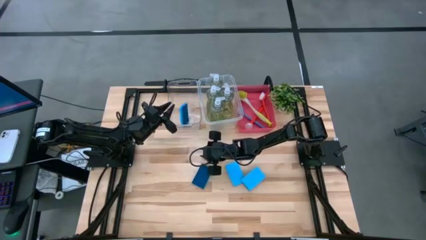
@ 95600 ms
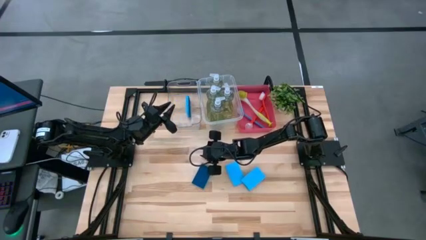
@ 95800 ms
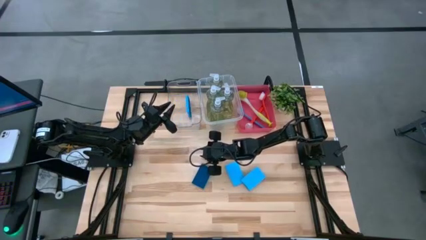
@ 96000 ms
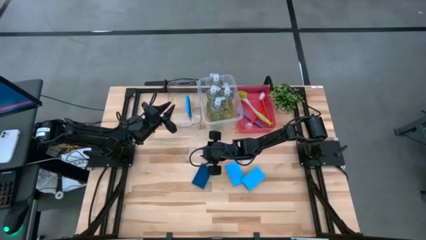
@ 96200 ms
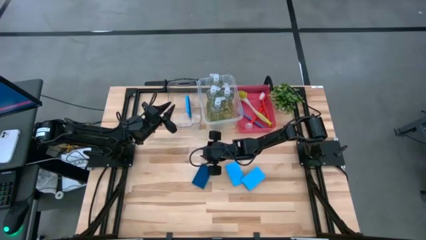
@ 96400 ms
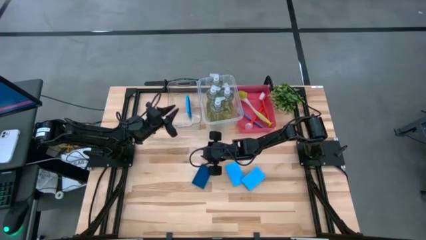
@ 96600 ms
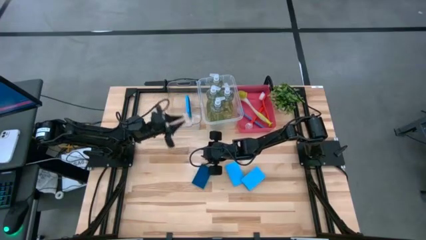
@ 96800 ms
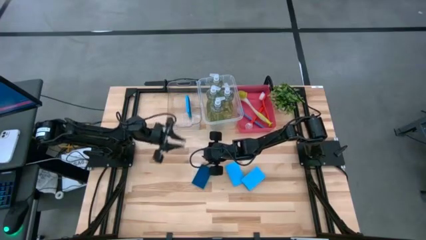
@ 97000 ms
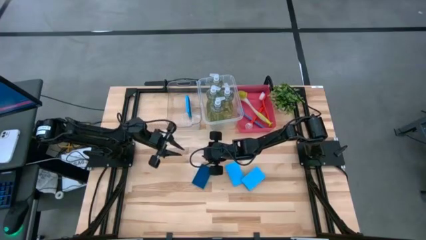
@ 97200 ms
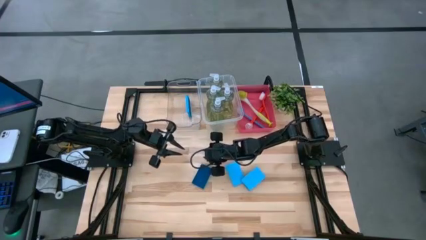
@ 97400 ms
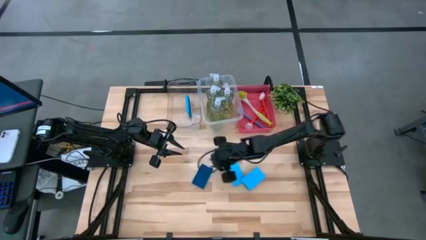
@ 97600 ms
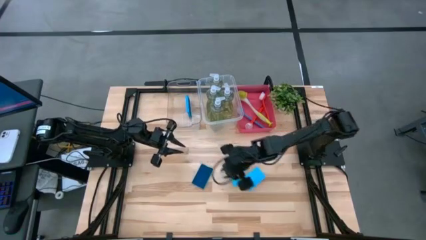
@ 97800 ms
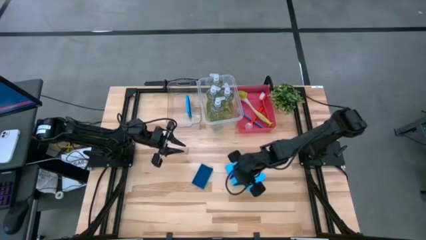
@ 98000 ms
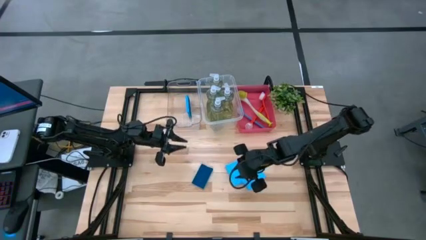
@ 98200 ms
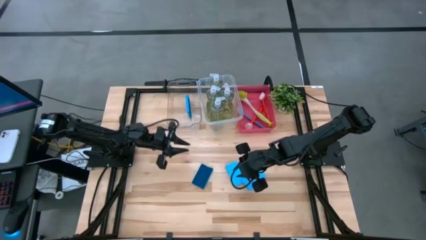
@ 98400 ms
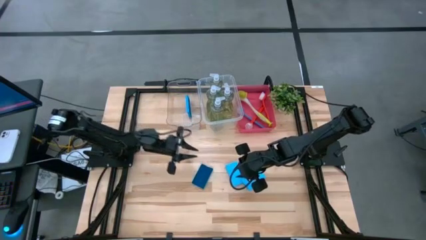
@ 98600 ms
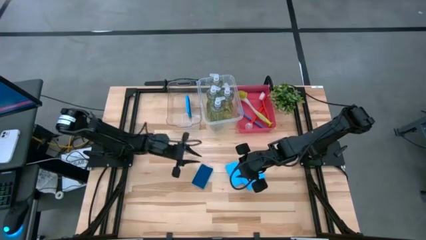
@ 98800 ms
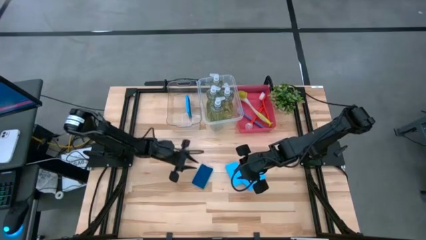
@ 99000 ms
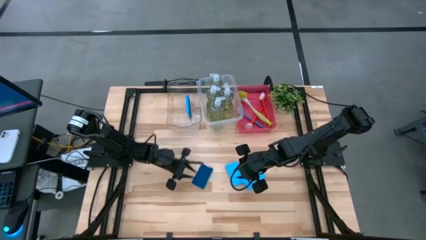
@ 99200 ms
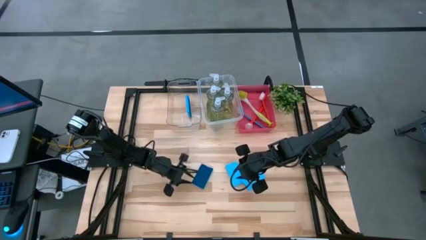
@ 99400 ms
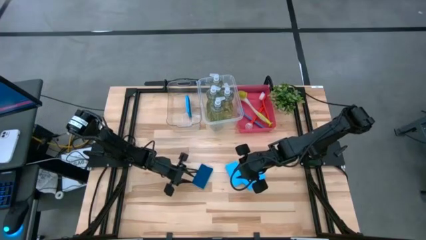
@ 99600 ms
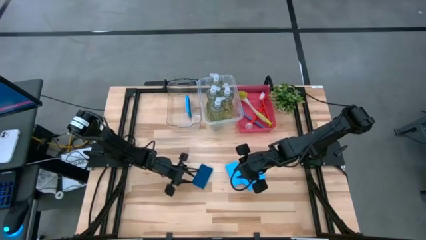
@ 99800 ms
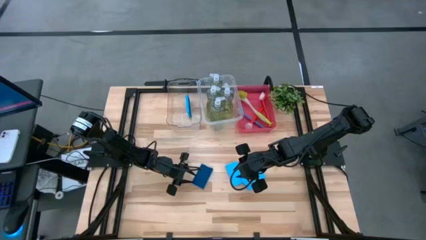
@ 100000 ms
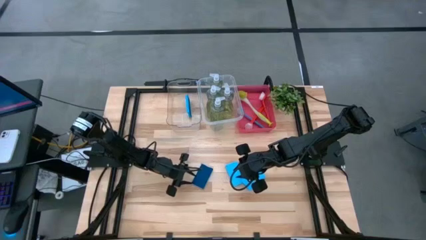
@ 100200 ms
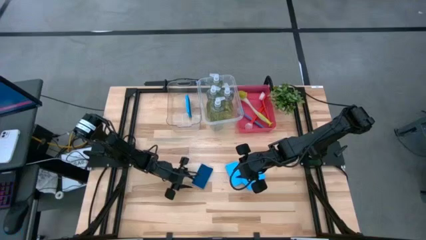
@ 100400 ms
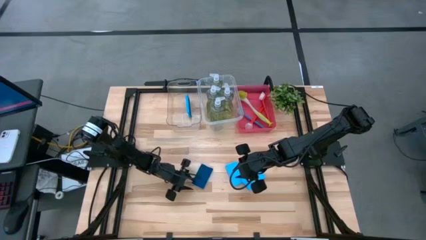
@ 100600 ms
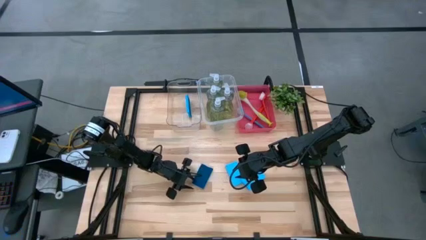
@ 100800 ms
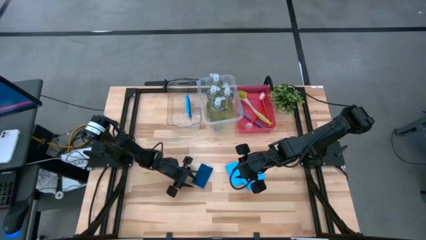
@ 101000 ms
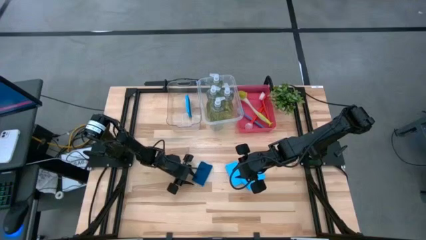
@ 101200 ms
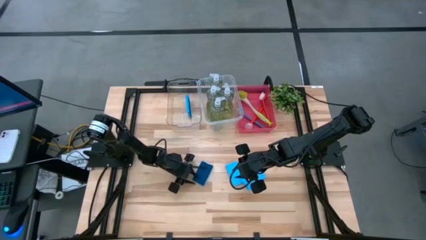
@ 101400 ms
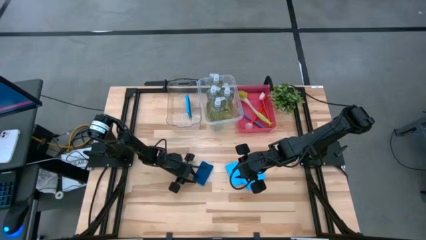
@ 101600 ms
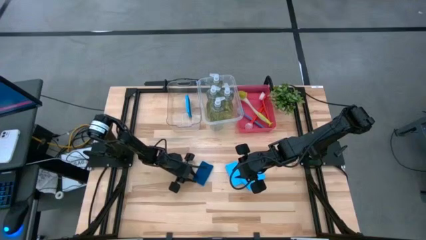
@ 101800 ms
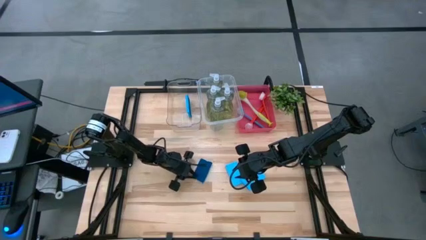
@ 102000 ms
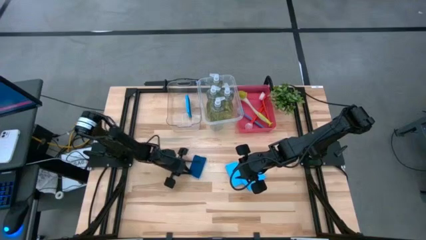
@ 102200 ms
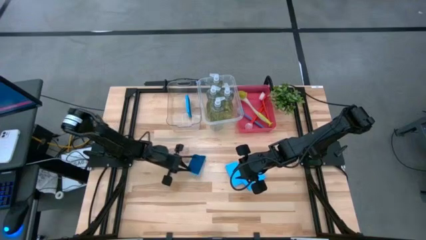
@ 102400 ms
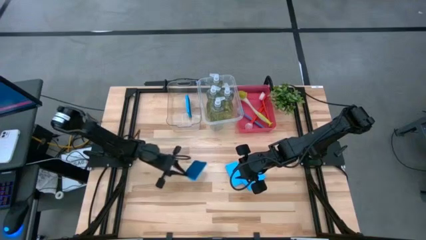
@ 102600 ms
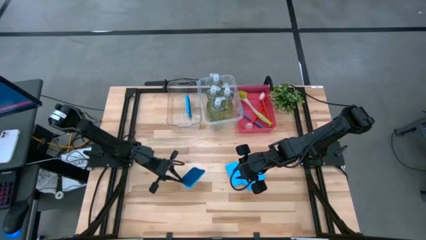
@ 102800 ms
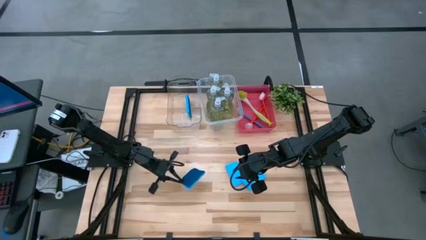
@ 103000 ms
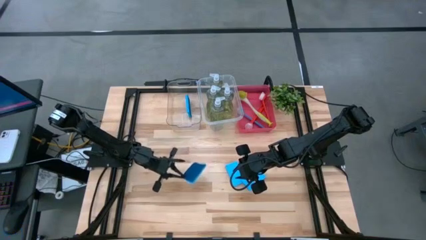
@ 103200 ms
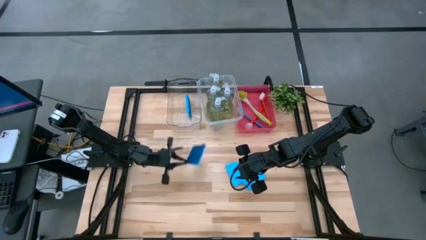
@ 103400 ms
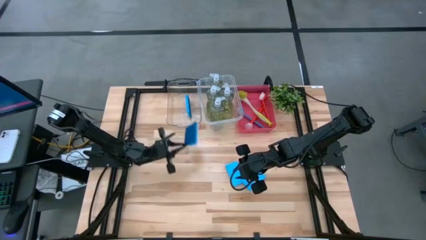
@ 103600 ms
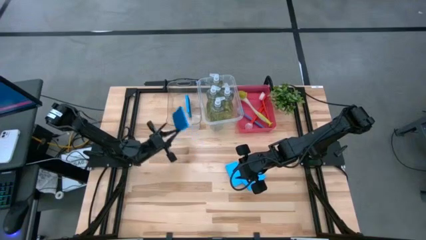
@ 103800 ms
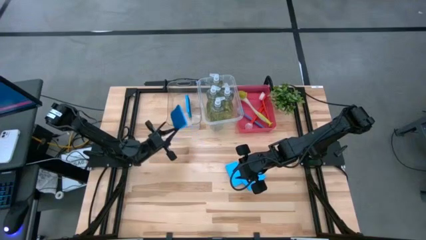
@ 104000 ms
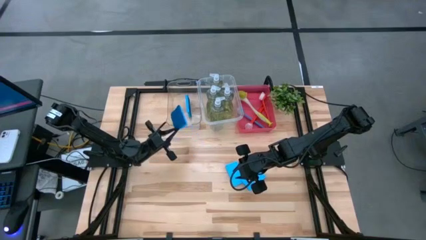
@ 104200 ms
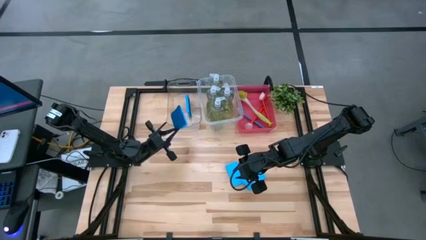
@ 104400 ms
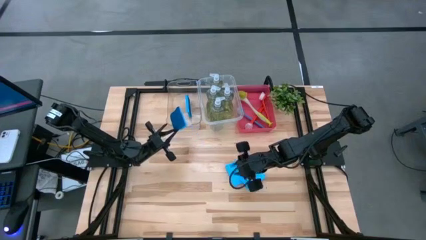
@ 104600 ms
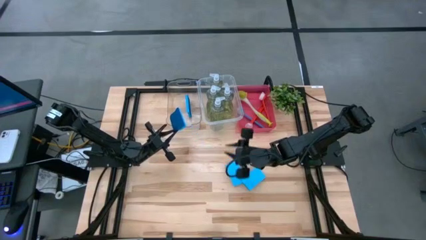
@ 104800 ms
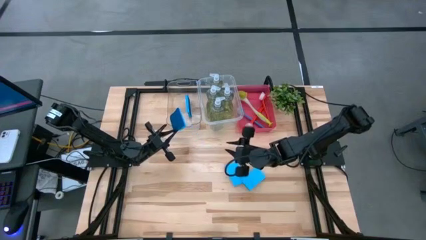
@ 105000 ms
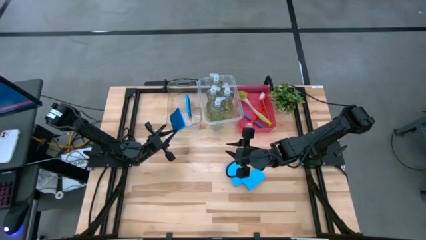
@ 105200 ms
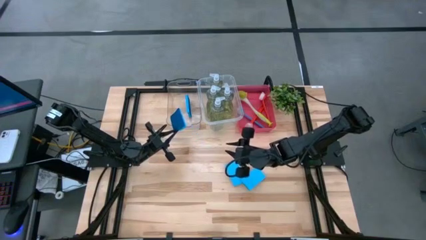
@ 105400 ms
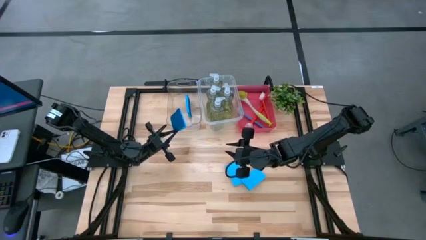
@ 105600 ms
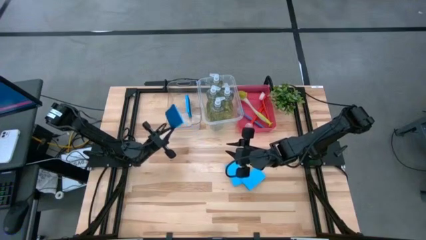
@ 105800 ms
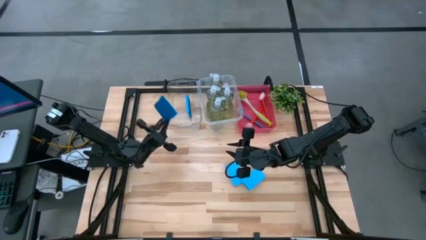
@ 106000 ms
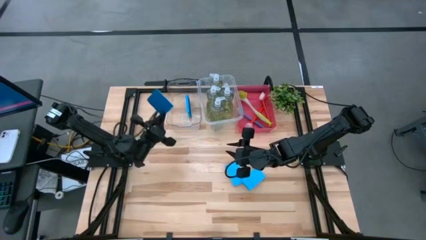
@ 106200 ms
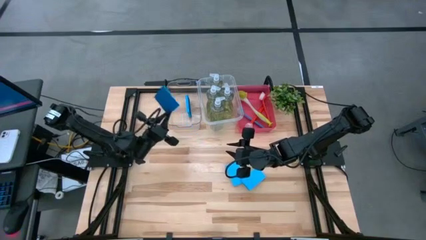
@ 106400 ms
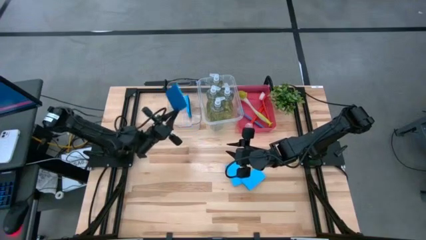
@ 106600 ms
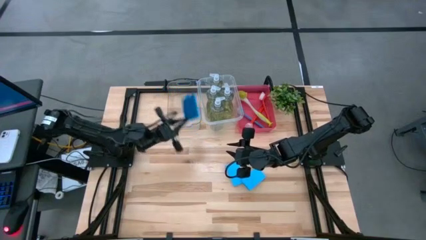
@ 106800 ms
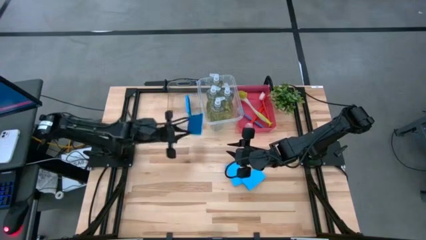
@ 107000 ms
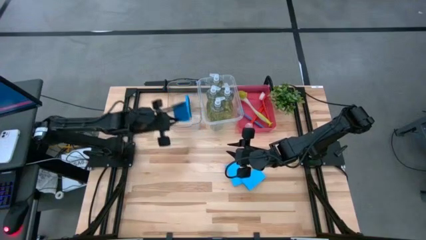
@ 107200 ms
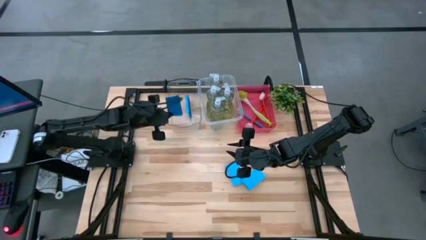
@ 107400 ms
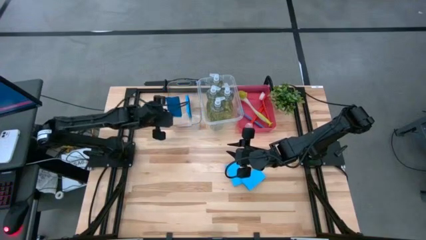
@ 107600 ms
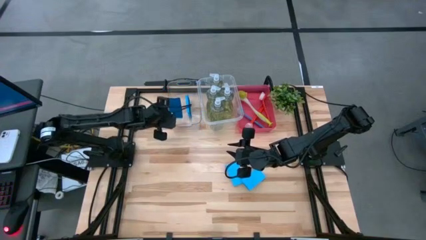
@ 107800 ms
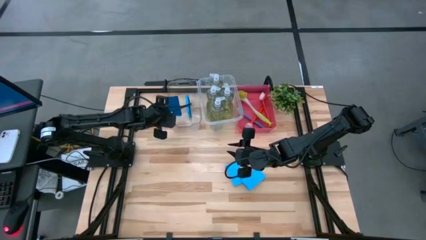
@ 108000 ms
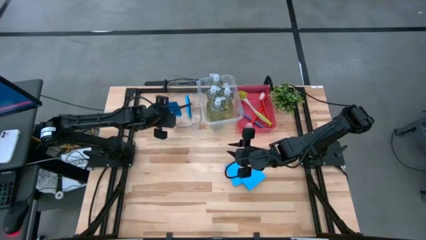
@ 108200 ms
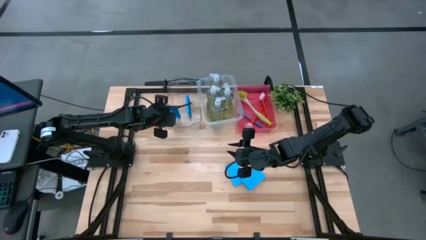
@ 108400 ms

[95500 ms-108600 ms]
Task: Pick & Place Kitchen Sink Supplies
Put the blue sponge into the left transparent bin

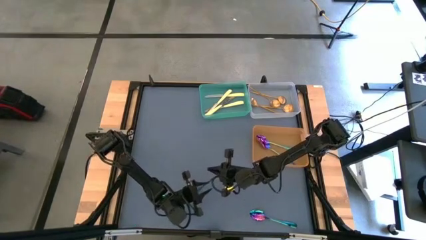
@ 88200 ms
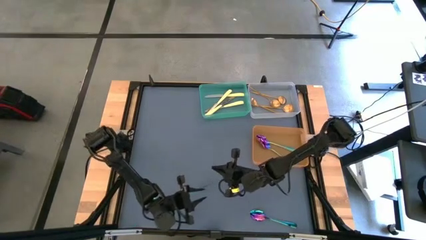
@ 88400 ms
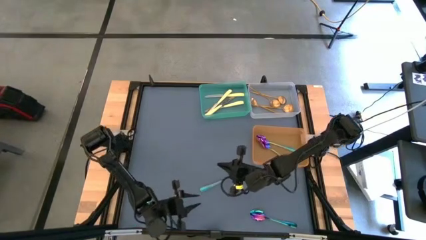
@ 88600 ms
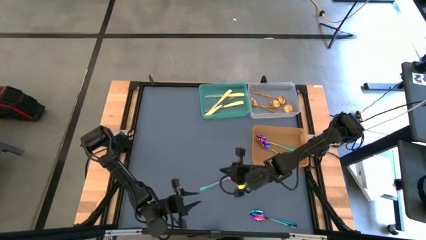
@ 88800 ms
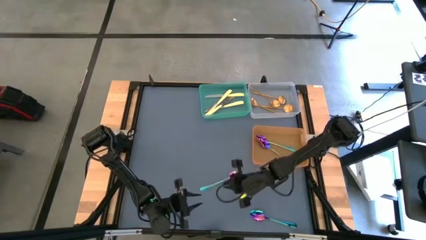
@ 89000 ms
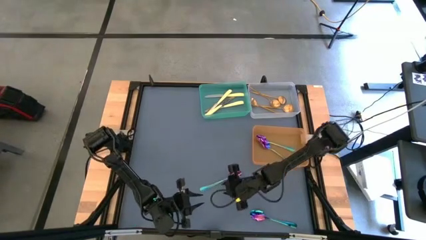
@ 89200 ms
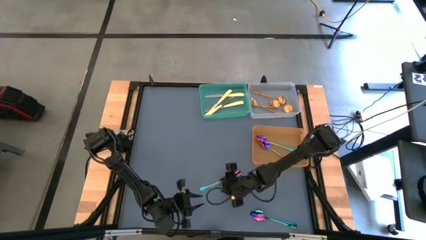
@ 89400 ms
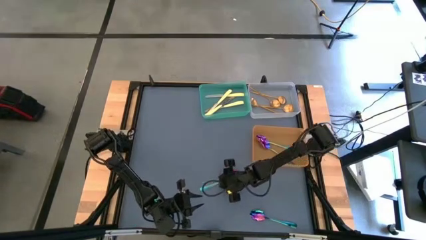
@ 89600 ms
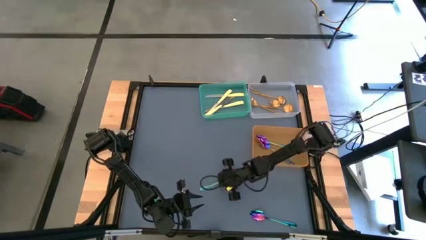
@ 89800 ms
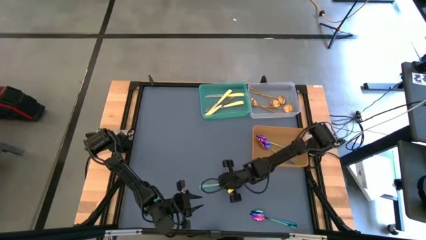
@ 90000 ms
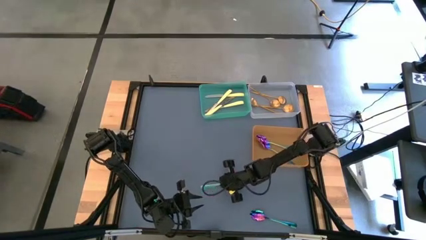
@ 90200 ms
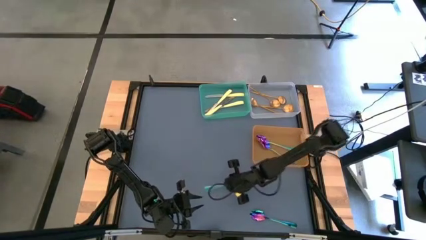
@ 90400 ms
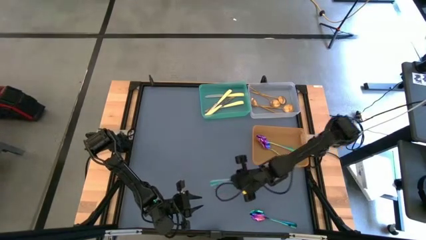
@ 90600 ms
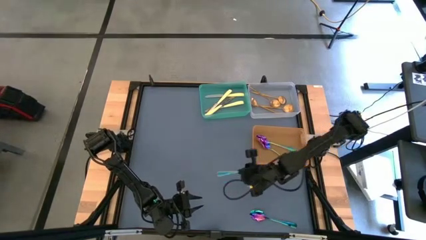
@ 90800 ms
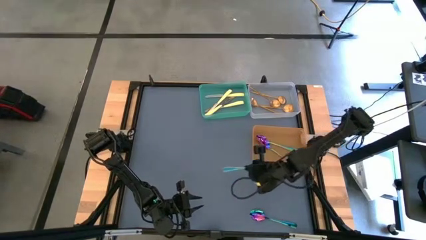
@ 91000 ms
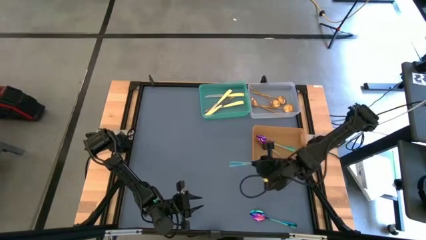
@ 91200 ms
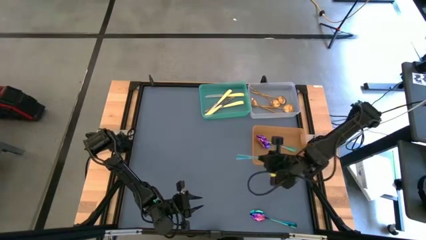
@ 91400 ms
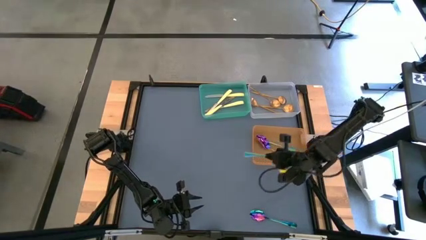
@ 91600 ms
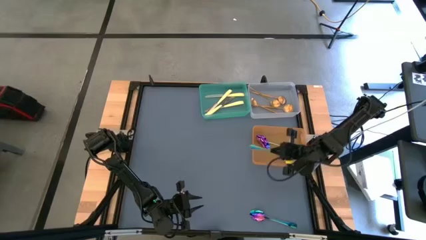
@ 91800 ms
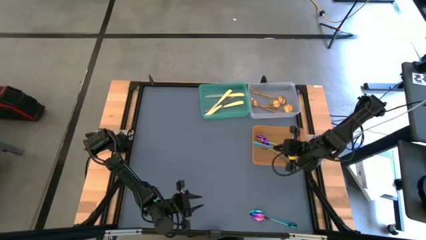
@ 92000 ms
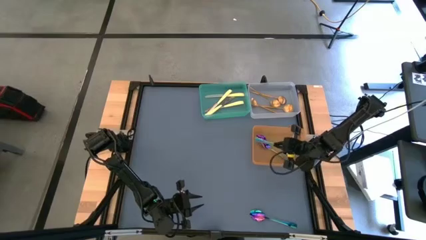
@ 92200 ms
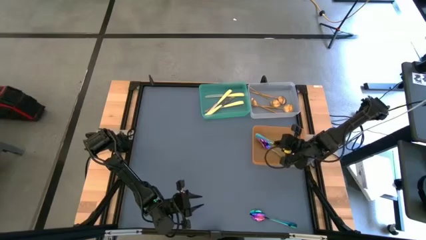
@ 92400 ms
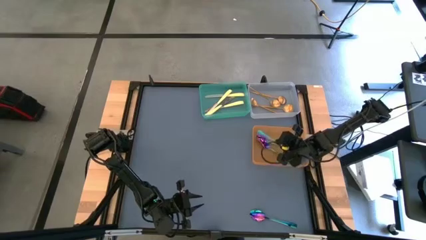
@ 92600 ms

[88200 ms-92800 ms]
Task: Sort silverware by color (type)
Put the iridescent spoon into the orange bin
